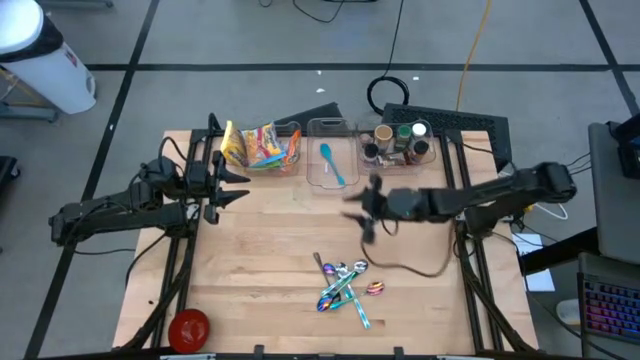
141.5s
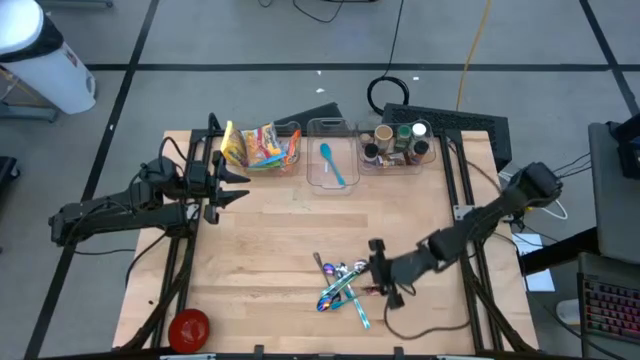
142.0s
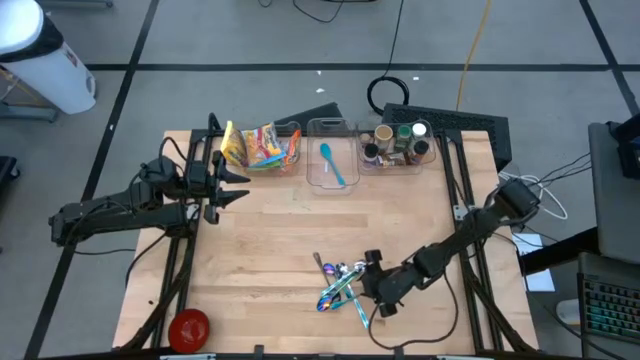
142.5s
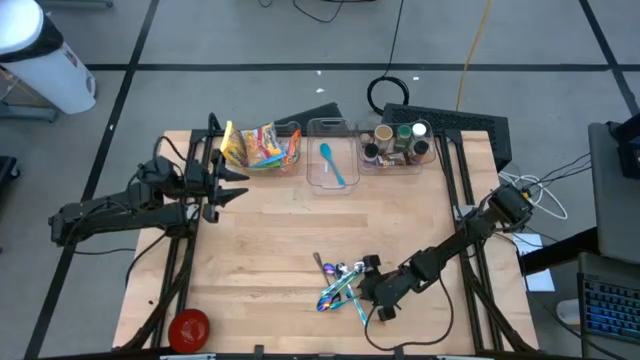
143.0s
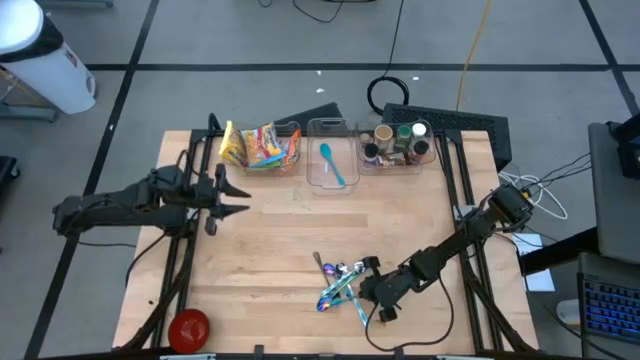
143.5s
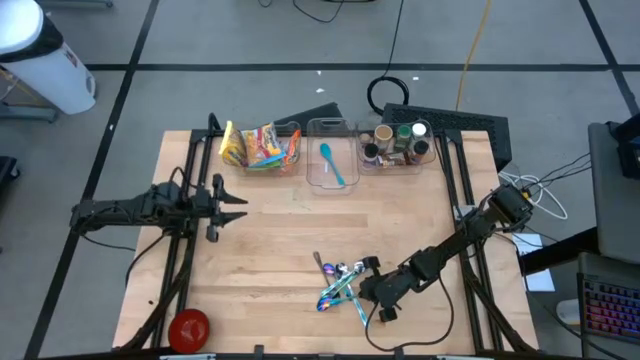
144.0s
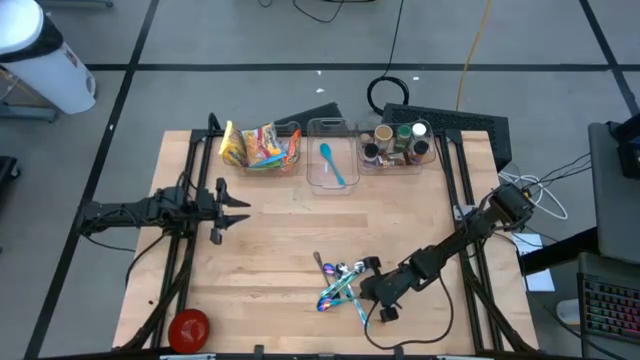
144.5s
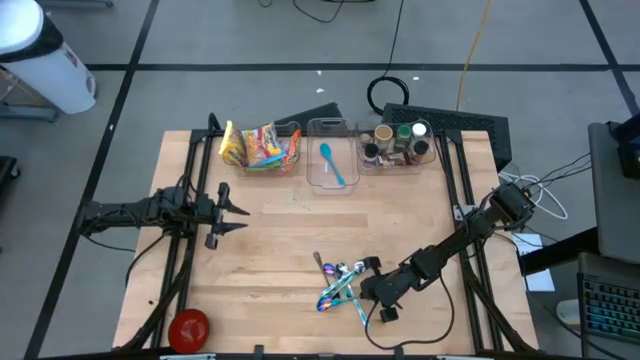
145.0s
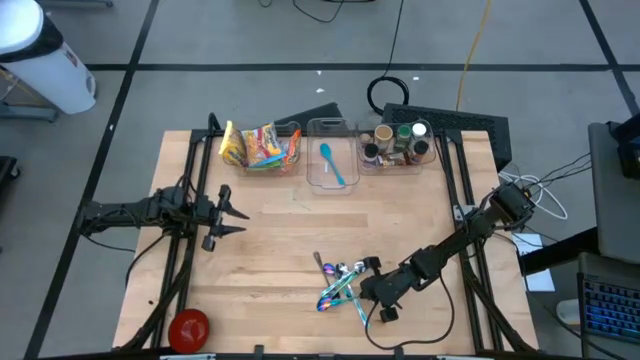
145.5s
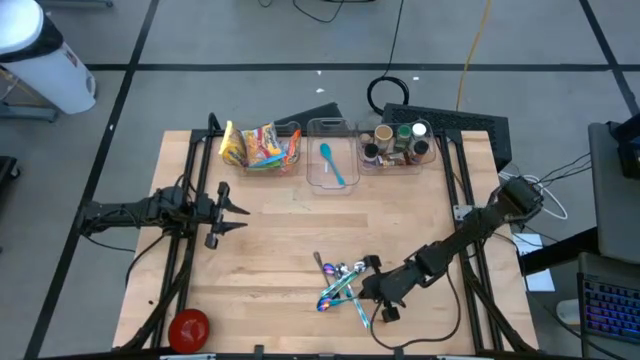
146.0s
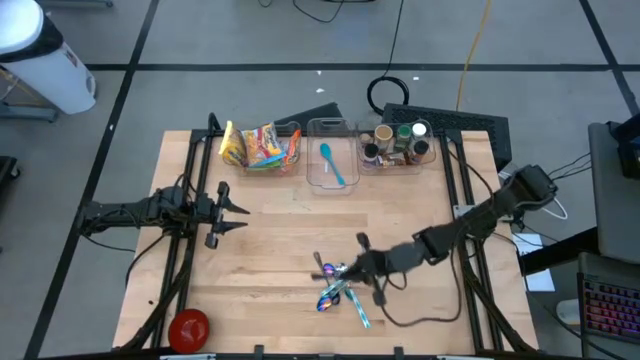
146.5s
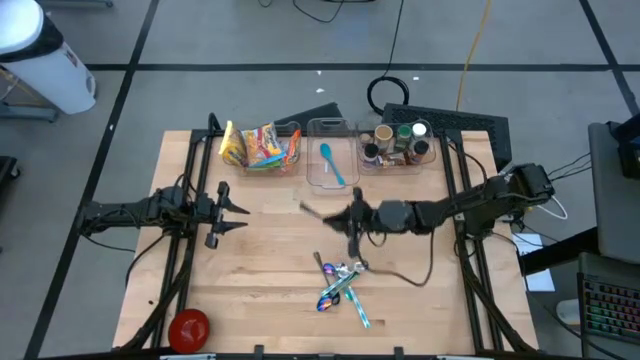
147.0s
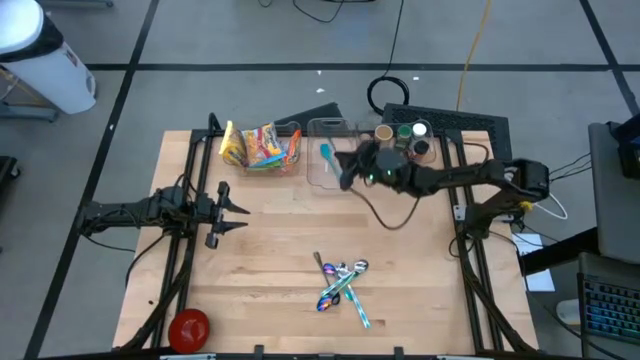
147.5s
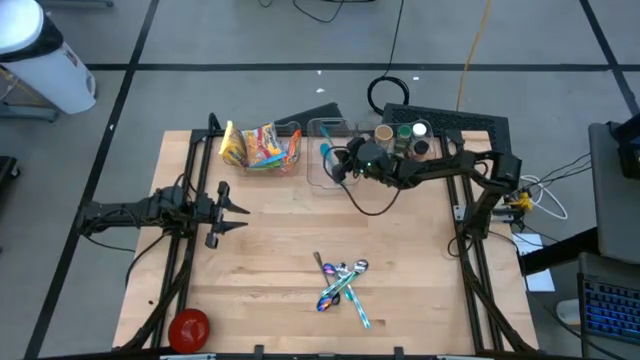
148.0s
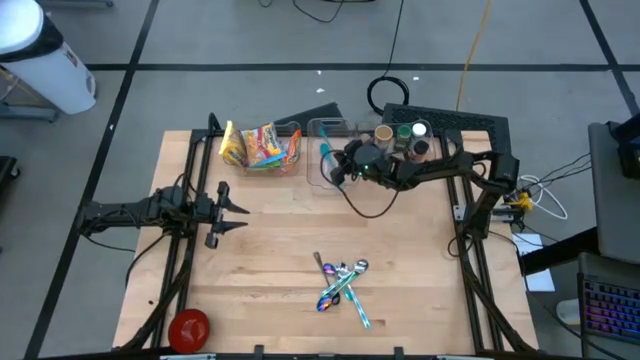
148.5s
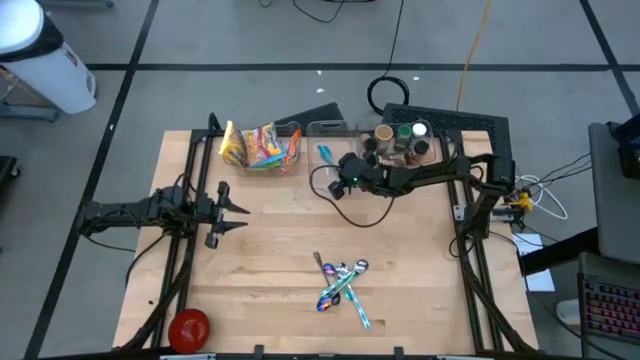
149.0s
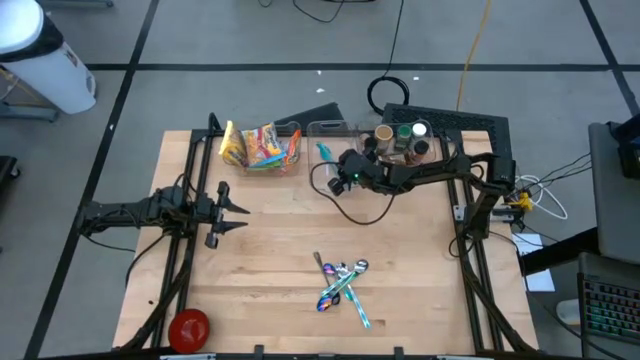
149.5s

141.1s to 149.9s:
Task: Pick & Place Food Item
Put the blue spoon into the middle transparent bin

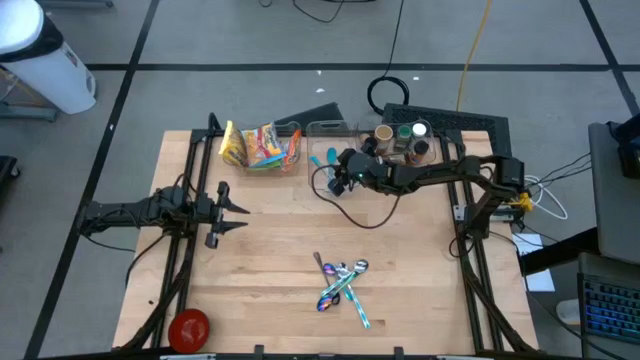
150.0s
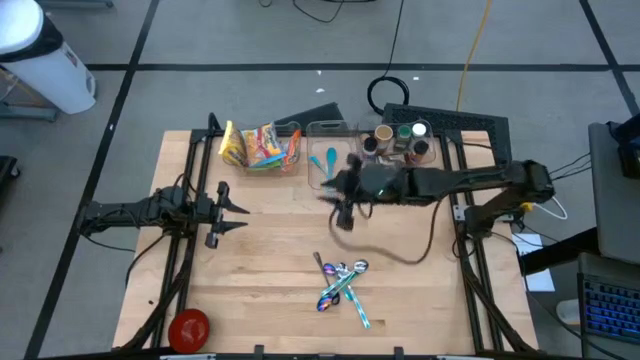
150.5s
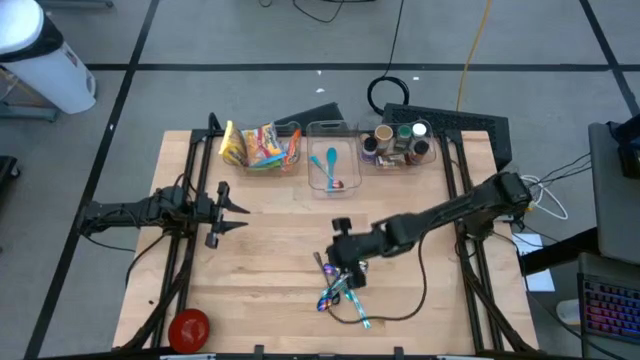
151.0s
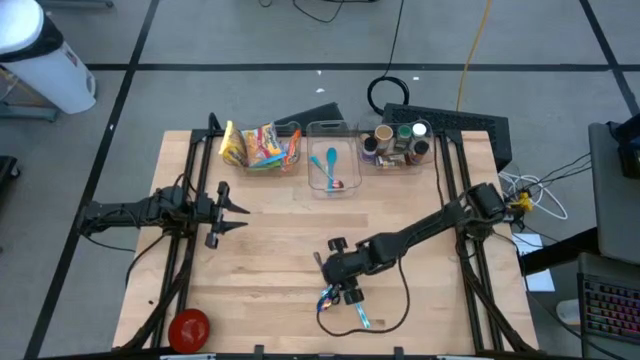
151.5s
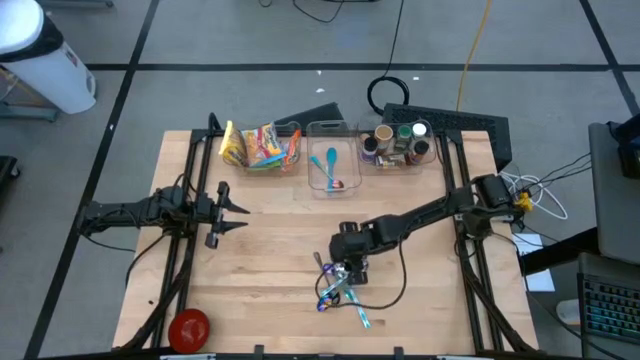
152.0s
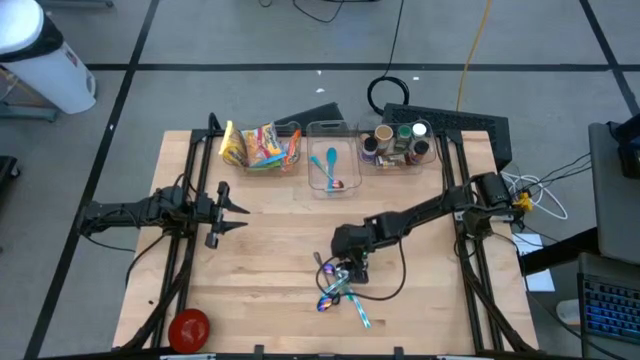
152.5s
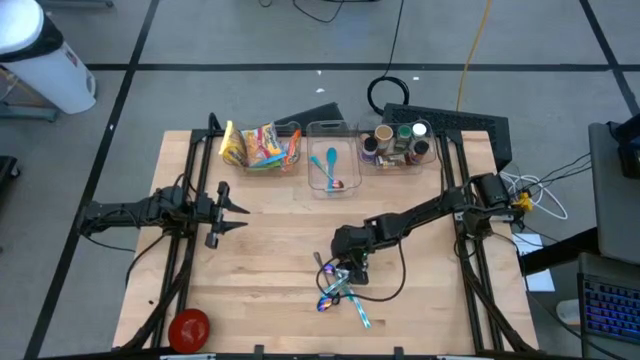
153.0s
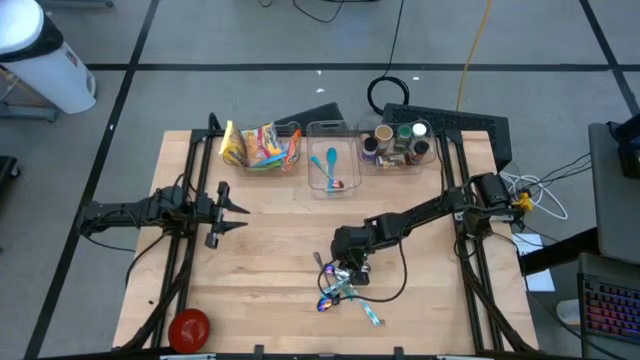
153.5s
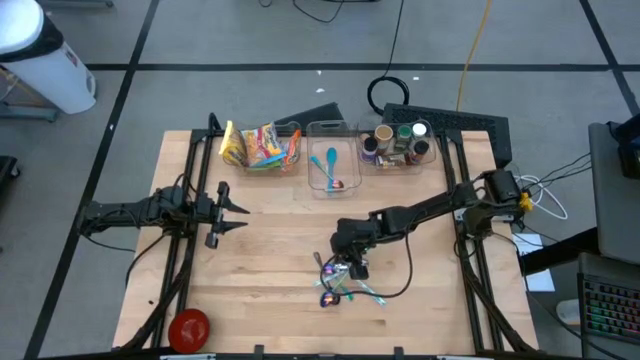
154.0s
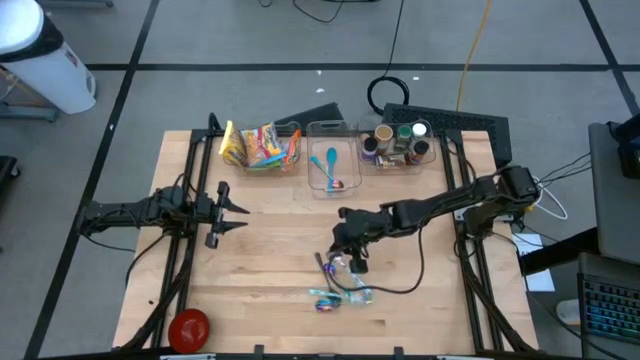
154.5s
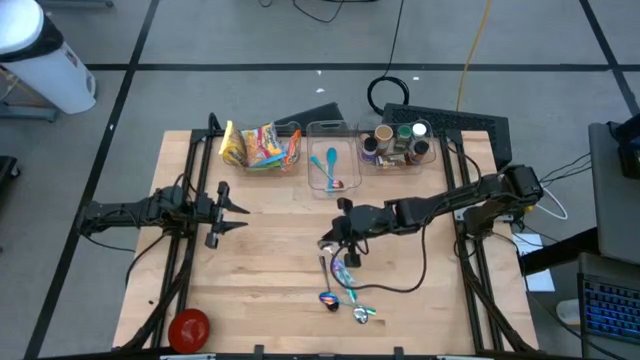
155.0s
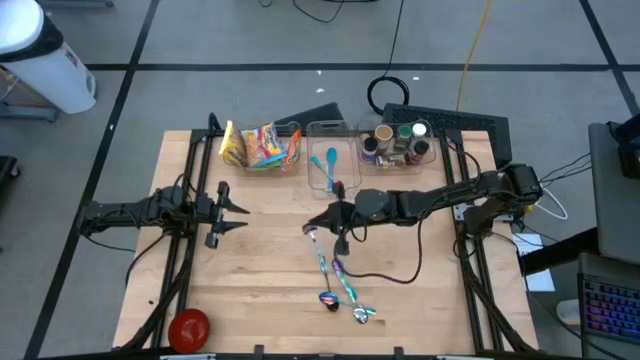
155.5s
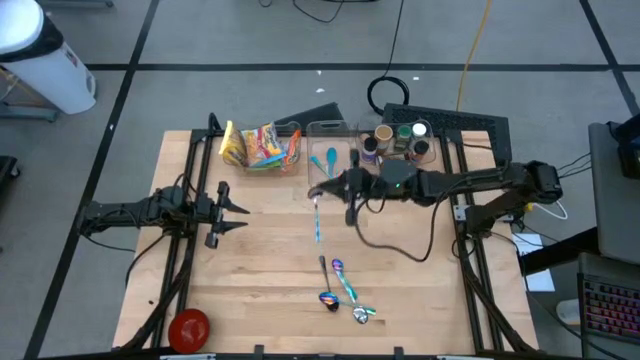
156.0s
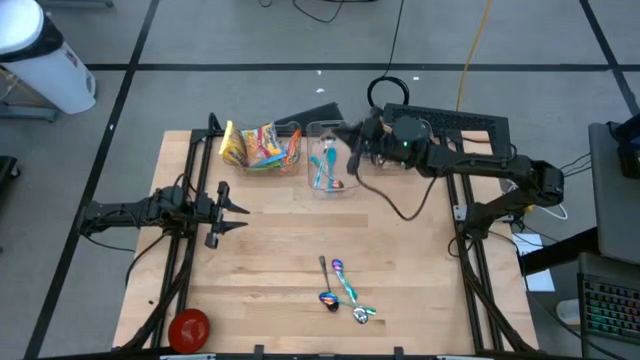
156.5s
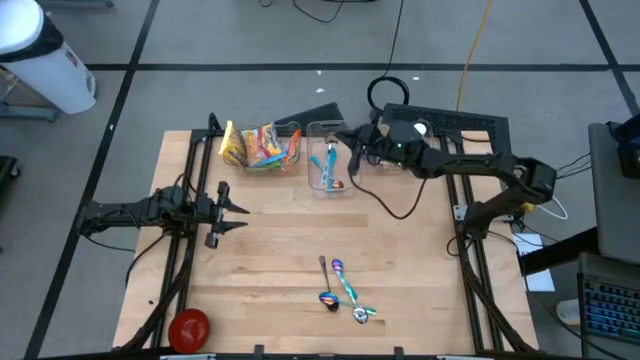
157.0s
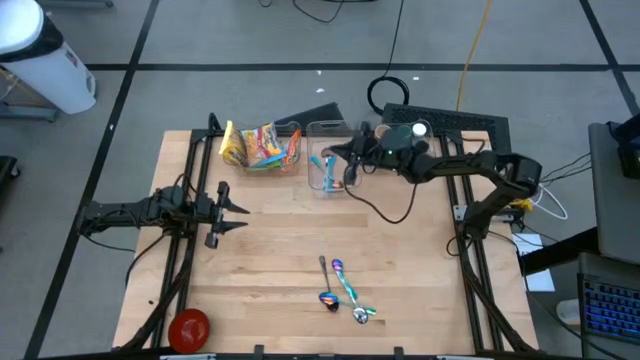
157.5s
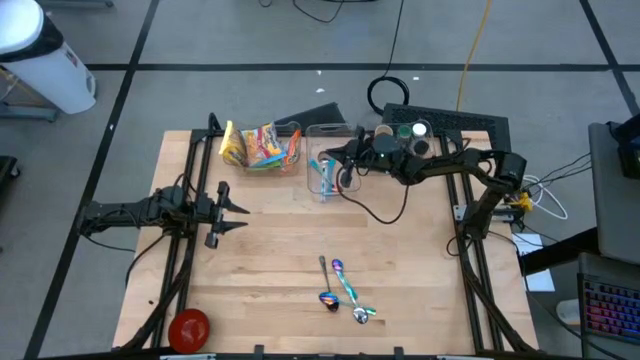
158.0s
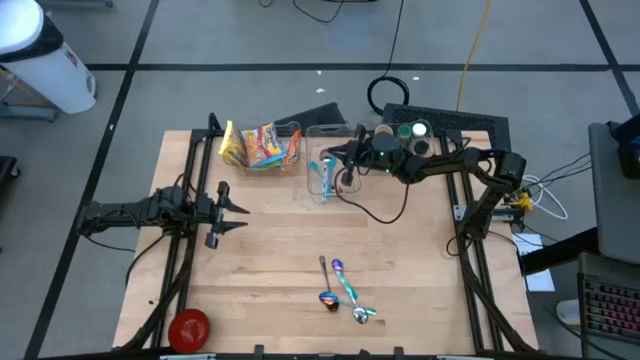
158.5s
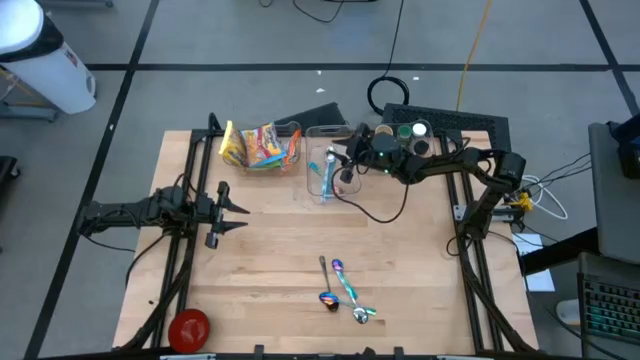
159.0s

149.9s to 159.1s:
Put the white patterned spoon into the middle transparent bin

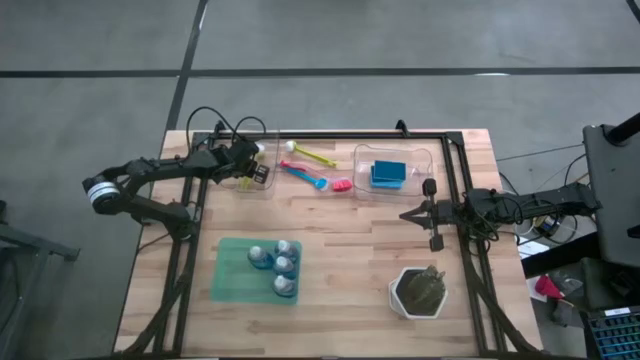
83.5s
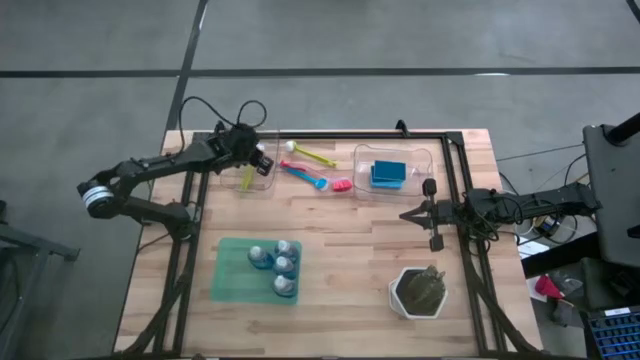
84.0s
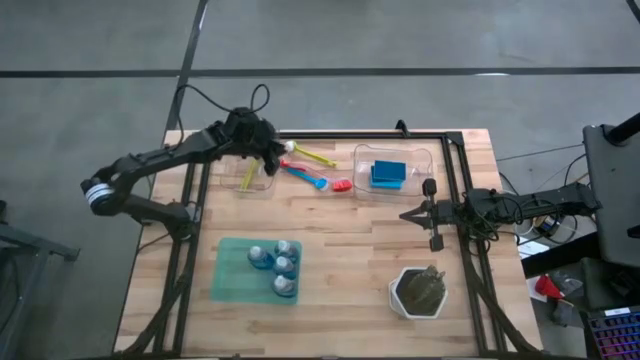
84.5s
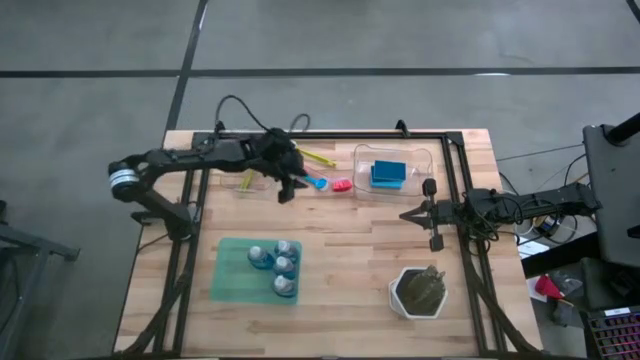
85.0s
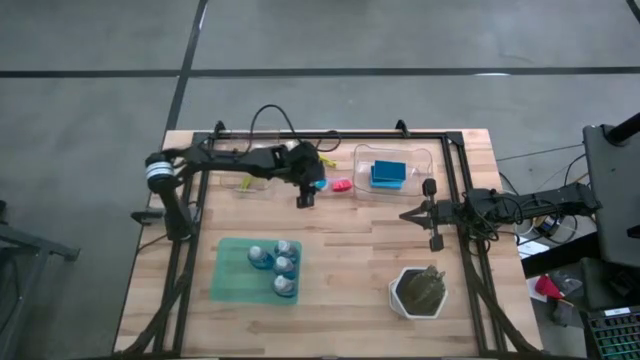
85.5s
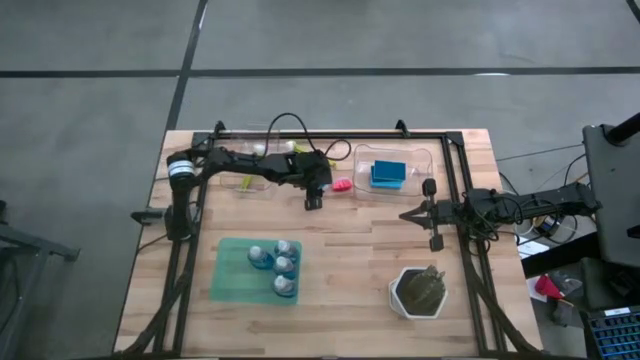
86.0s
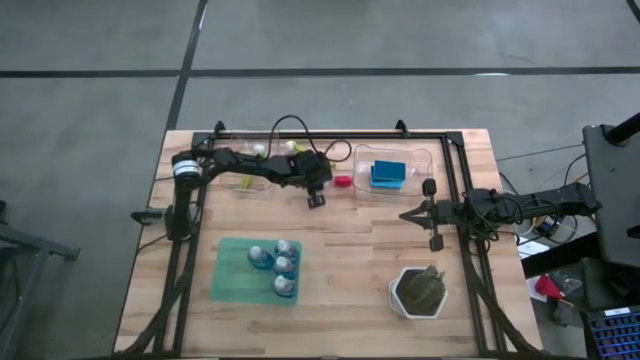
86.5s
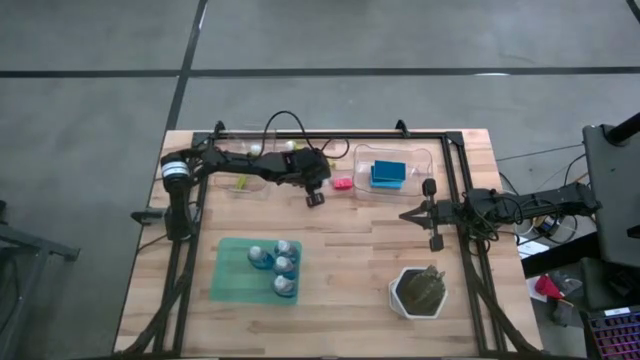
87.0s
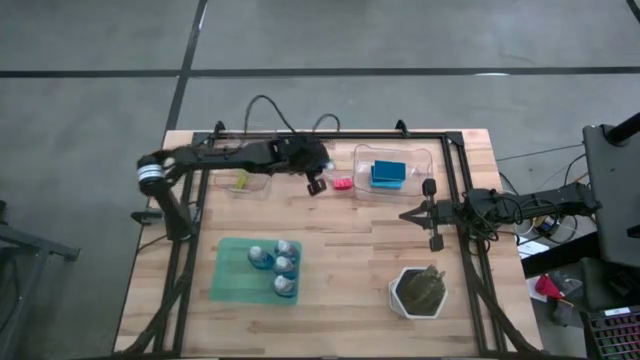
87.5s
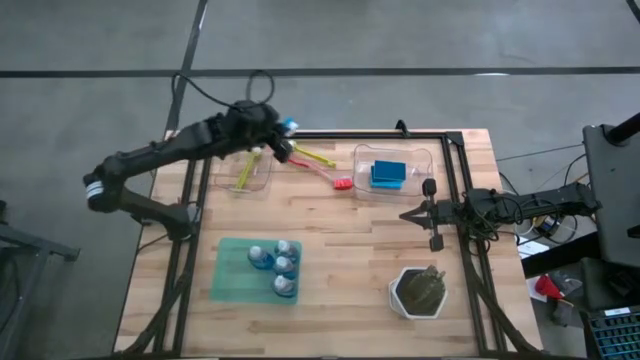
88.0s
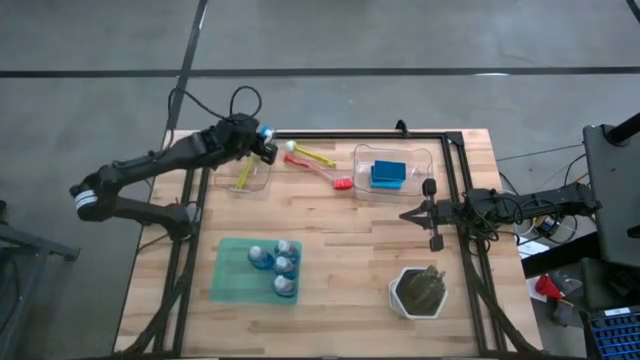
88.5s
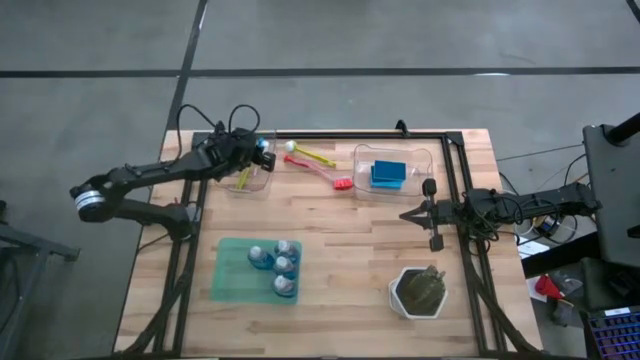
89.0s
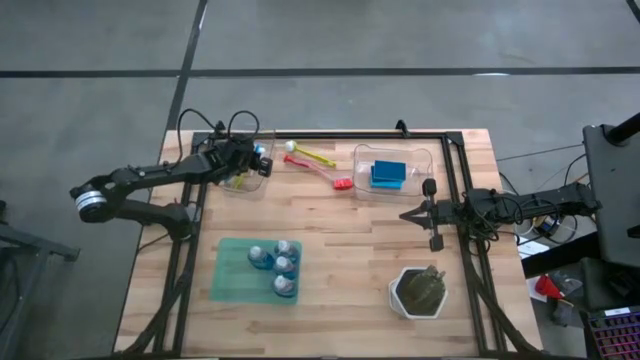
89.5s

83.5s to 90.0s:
Task: Pick & Place Kitchen Sink Supplies
Put the blue dishwashing brush into the left transparent bin
